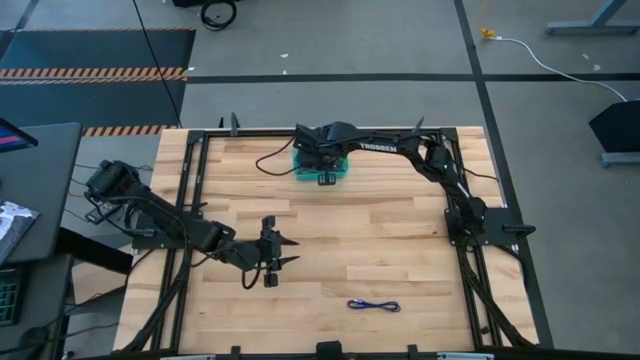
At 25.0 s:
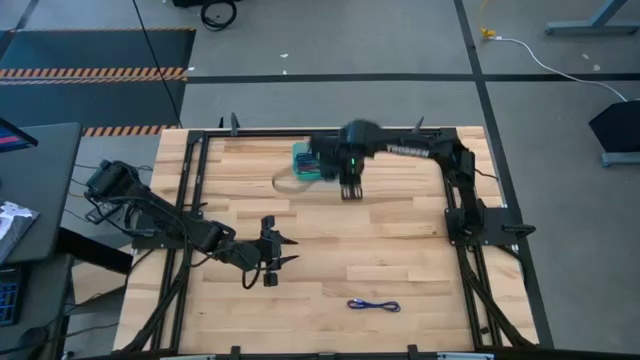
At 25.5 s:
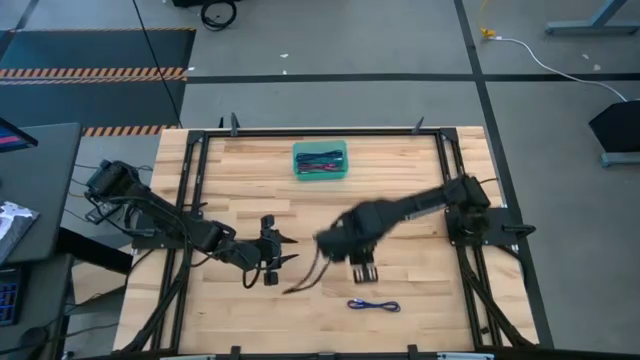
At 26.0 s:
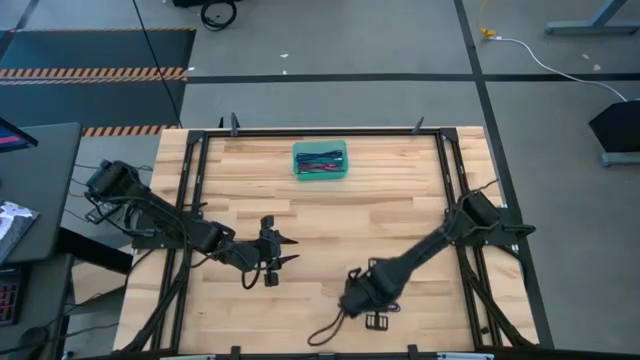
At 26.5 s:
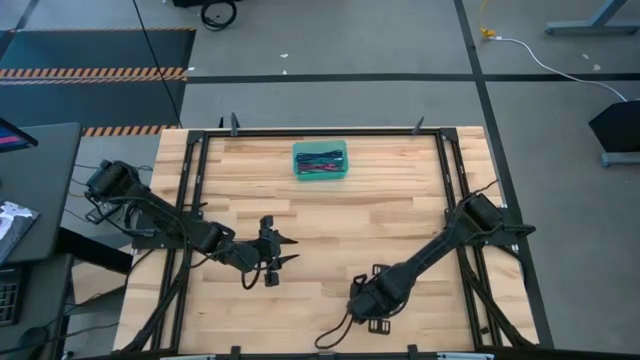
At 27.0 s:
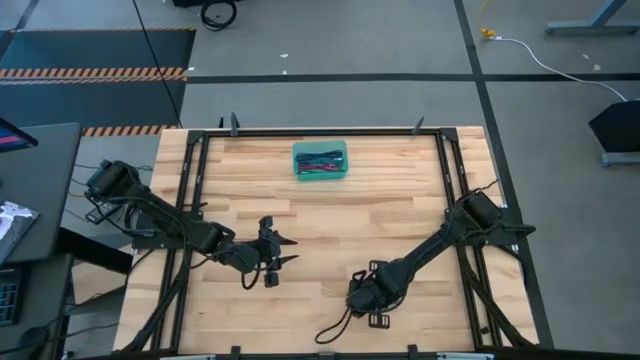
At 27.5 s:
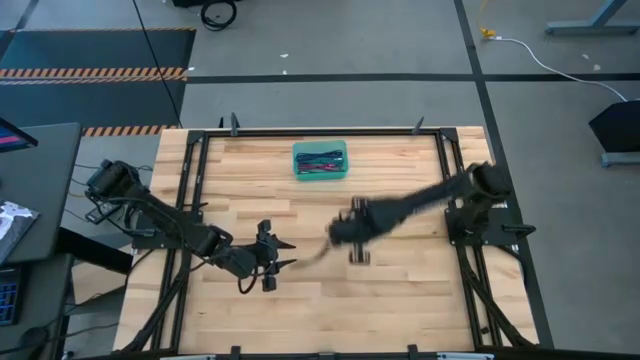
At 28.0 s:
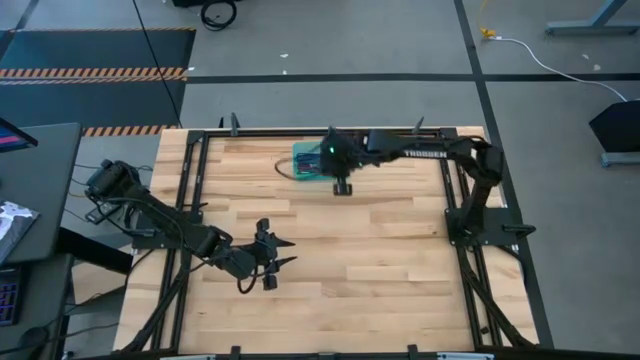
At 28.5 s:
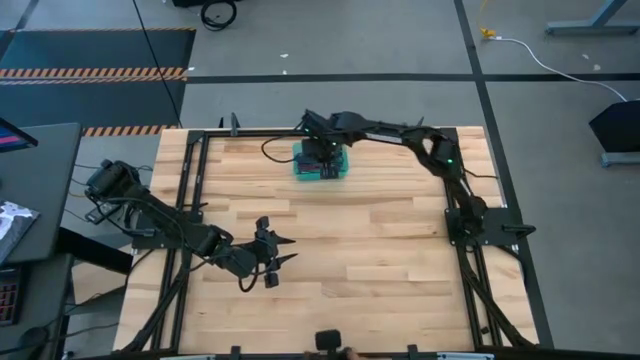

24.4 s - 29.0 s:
Task: Pick and place USB-C Cables
Put the purple charger cable into the green bin

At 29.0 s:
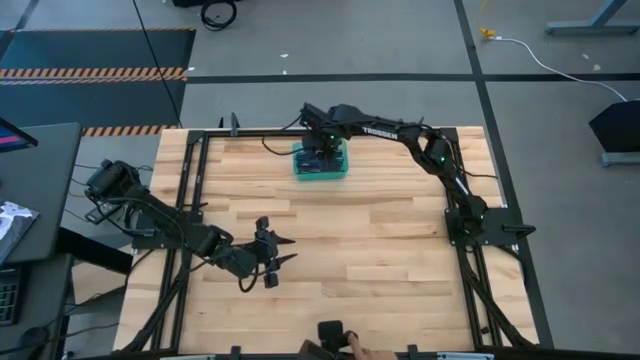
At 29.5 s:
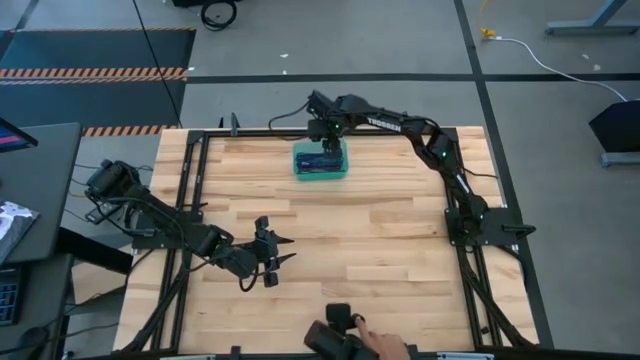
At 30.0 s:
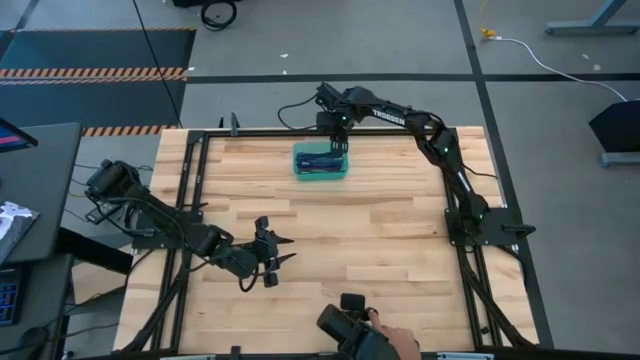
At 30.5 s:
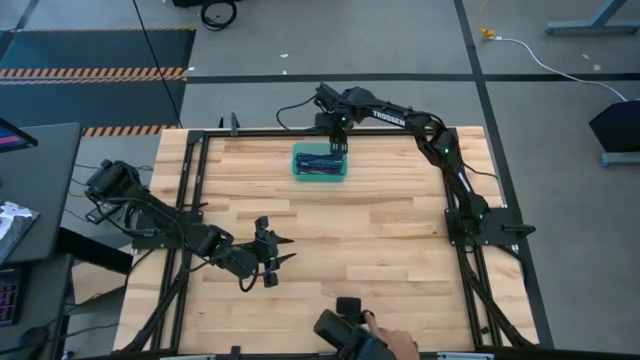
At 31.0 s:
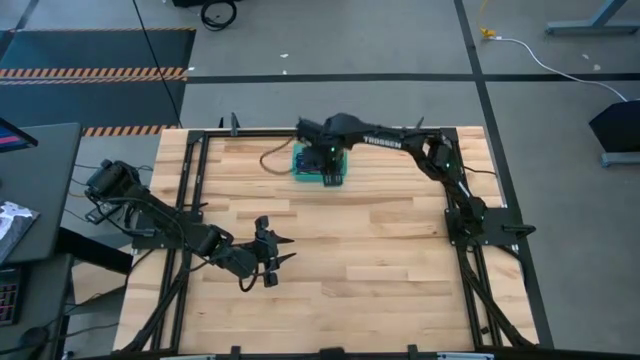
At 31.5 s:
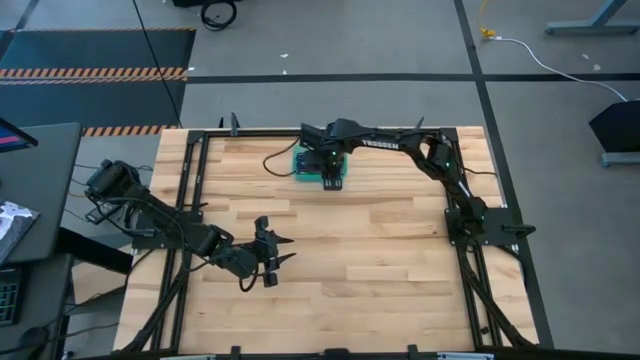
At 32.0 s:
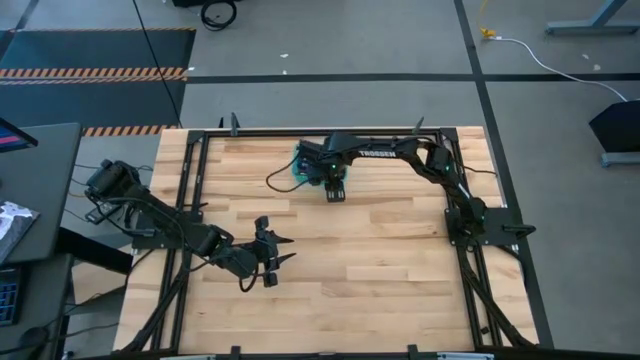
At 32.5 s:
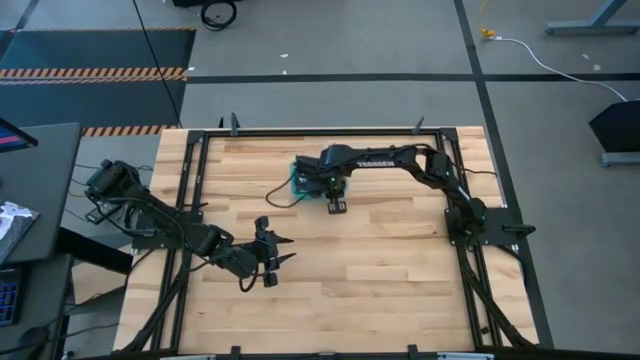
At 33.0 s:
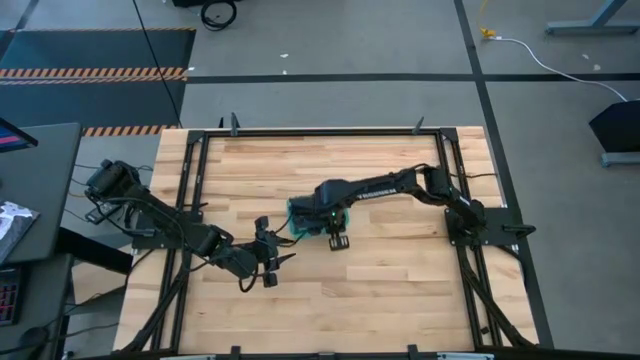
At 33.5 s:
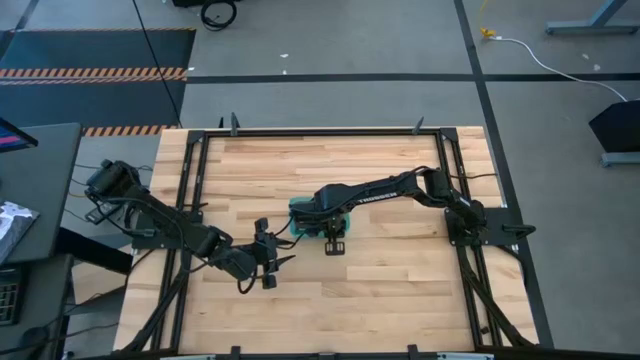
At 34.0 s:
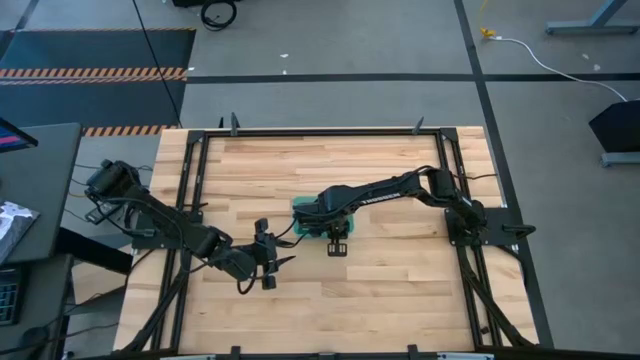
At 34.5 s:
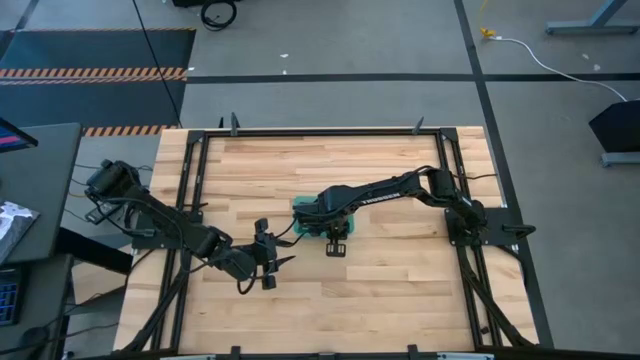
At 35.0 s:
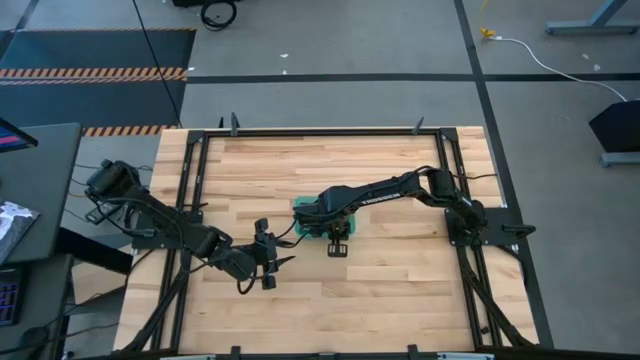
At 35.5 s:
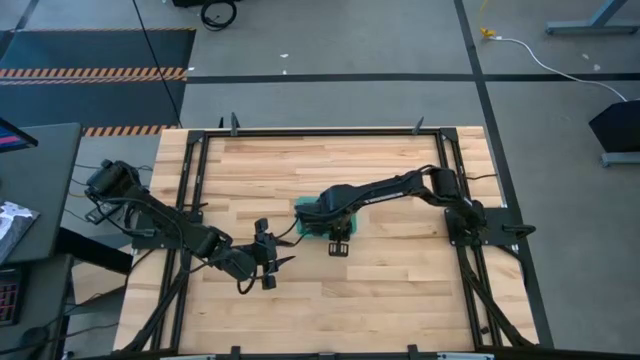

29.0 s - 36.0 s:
Move the green bin from the top to the middle of the table

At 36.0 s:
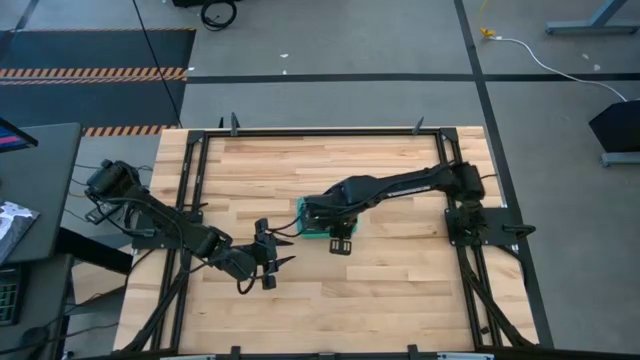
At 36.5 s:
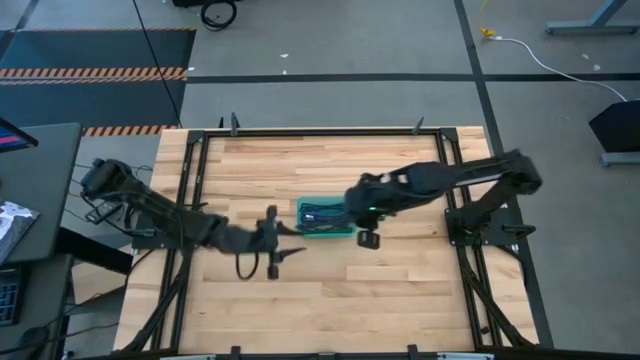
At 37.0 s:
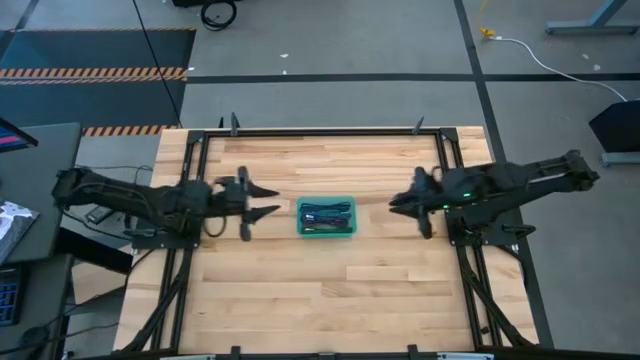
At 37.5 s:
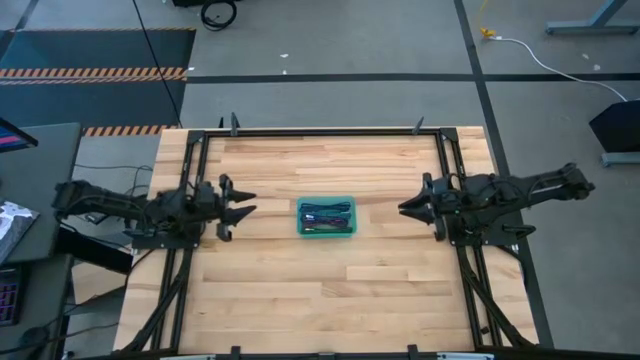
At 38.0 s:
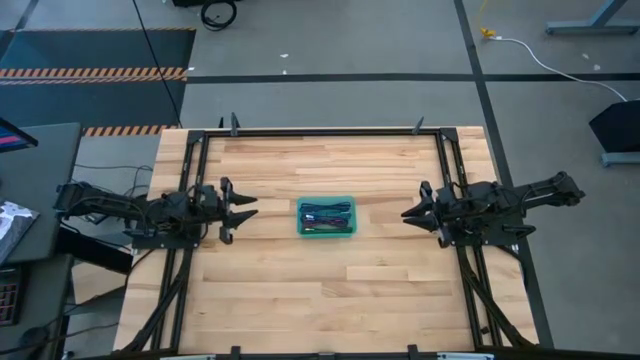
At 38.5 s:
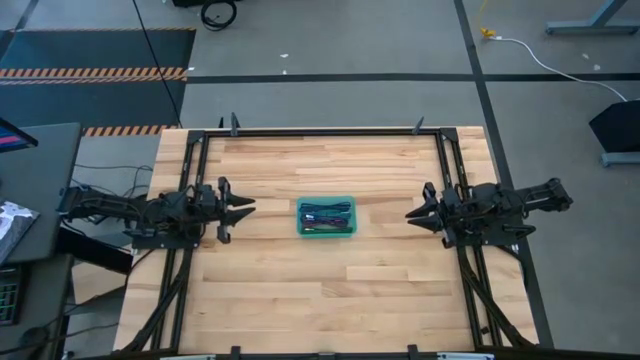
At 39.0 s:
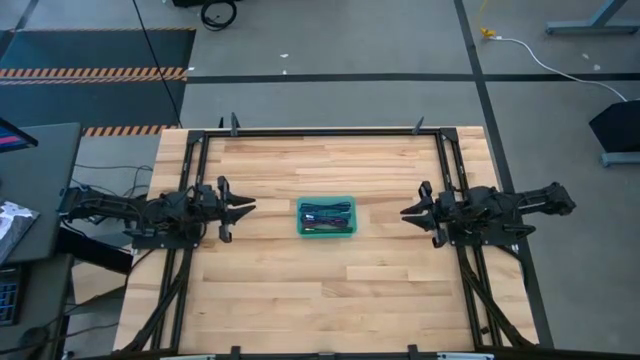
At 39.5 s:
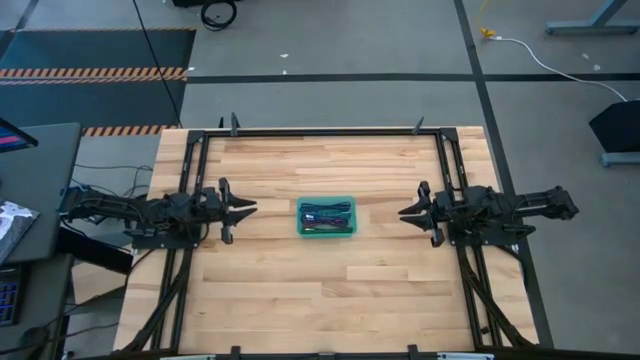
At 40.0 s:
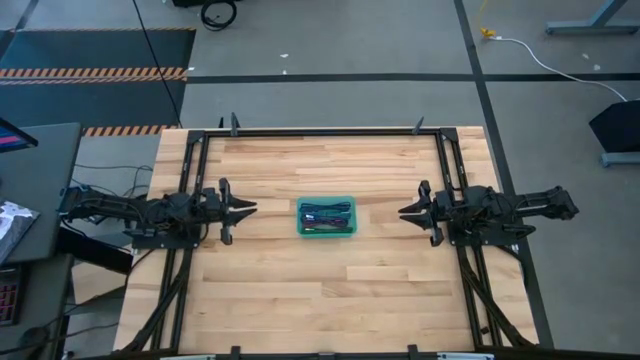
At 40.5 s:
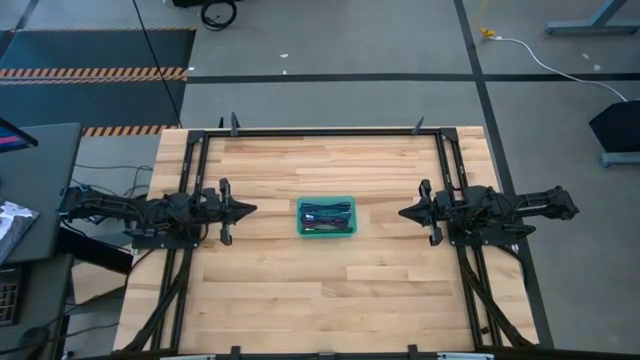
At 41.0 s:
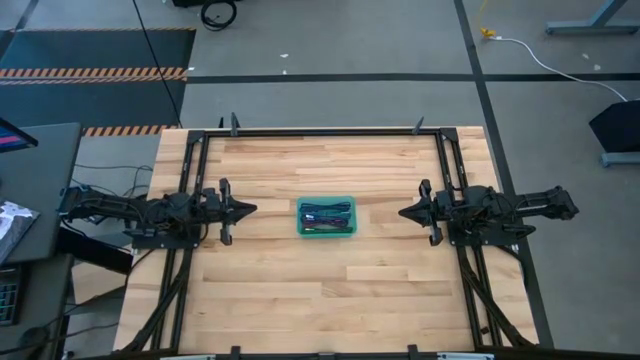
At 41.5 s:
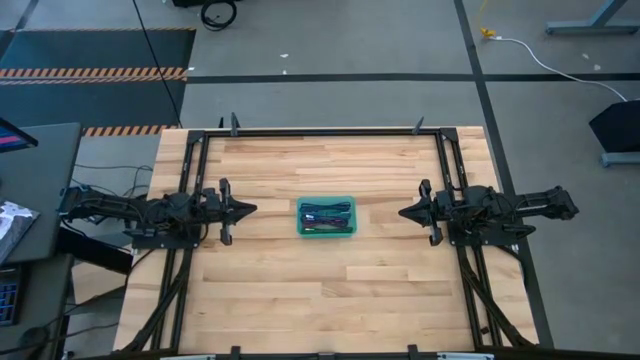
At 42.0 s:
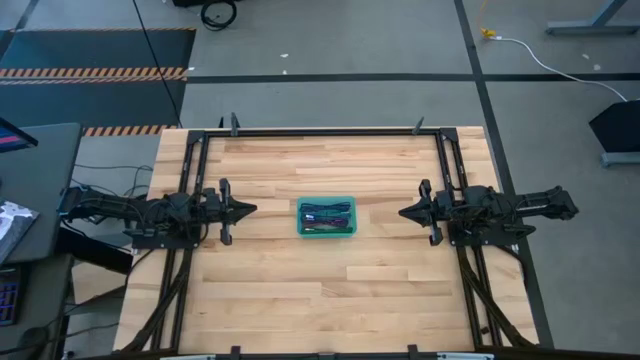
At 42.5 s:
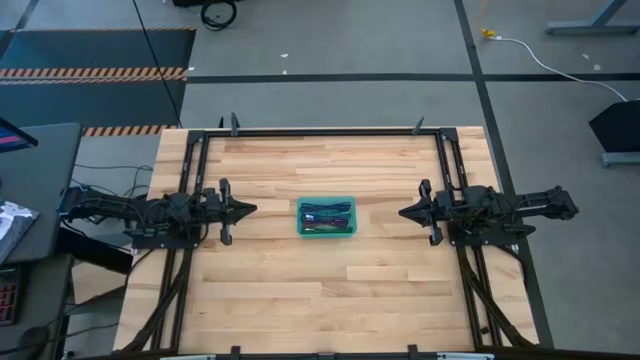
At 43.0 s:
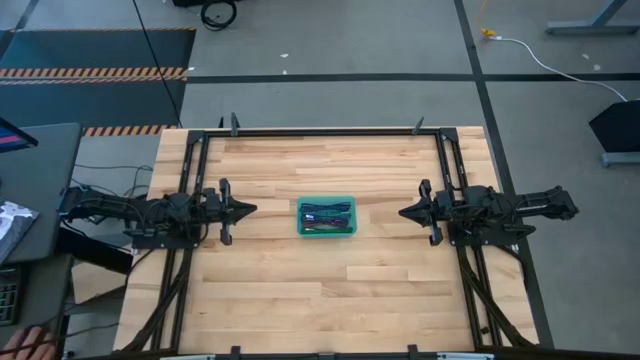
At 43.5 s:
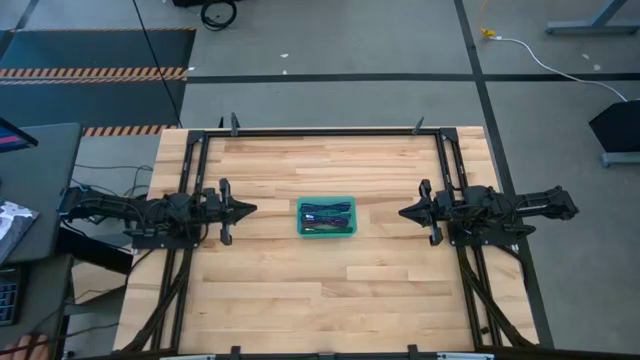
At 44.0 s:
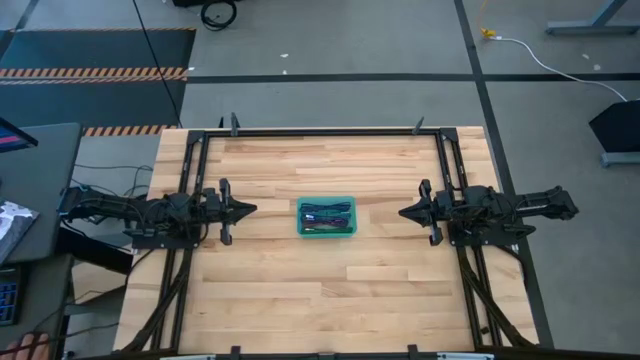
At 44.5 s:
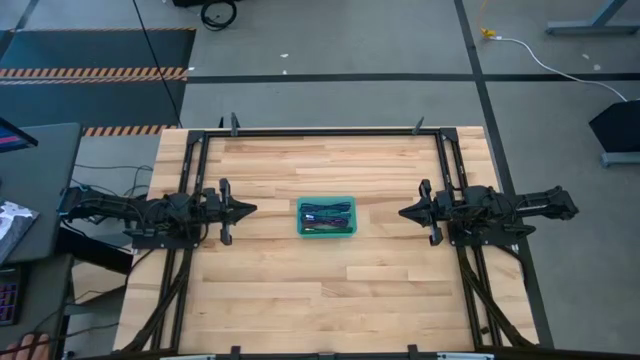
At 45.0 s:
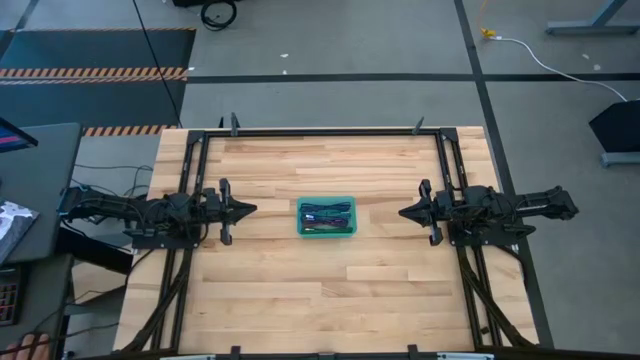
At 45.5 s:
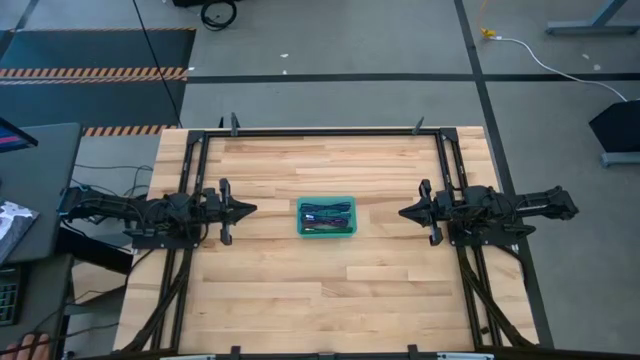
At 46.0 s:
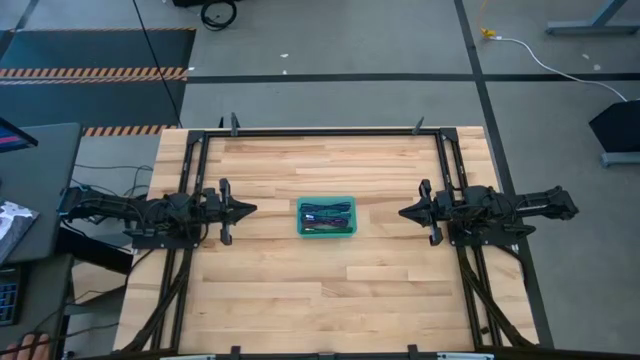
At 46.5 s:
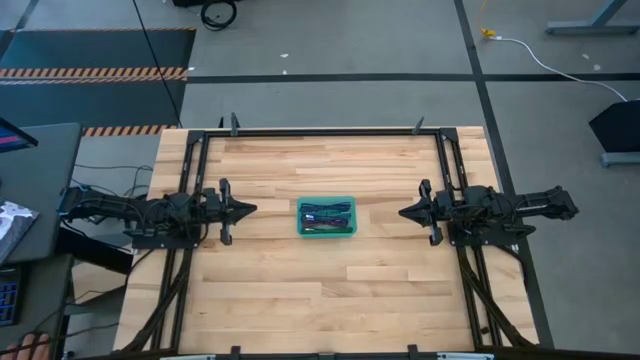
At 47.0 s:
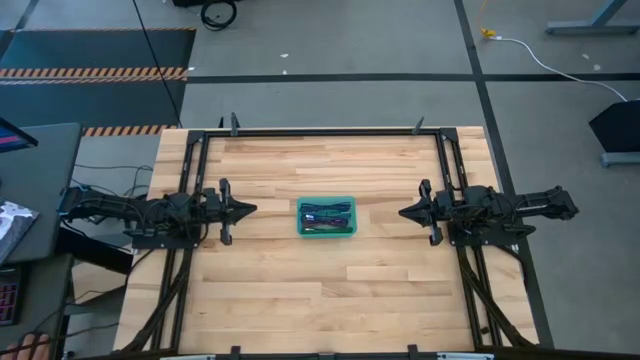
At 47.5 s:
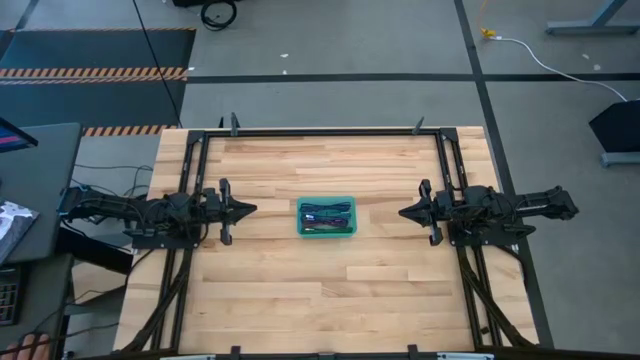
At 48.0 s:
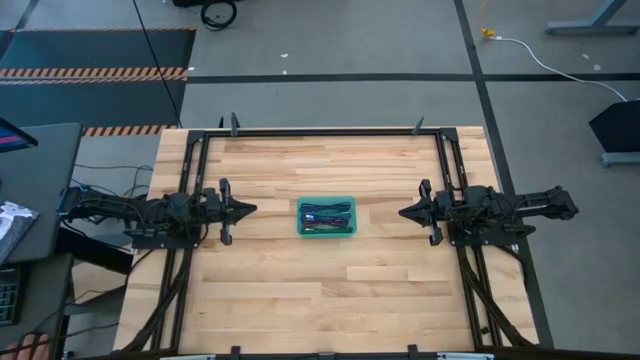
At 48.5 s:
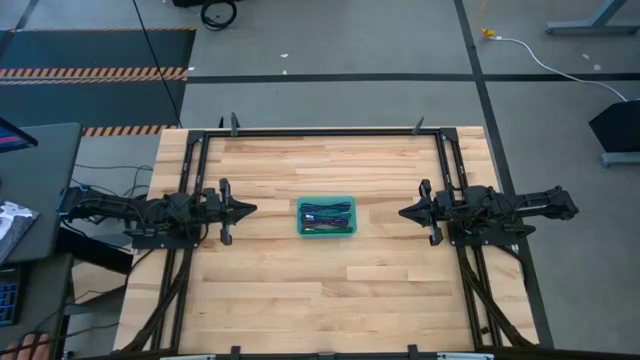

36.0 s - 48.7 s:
Return to Home Position
